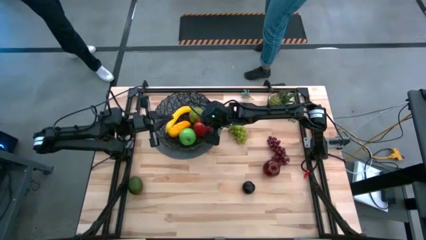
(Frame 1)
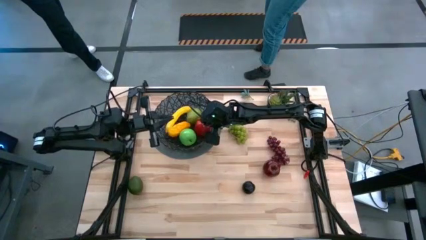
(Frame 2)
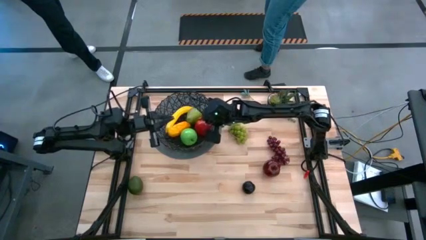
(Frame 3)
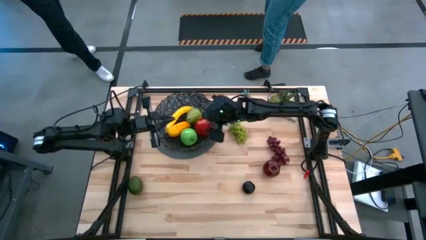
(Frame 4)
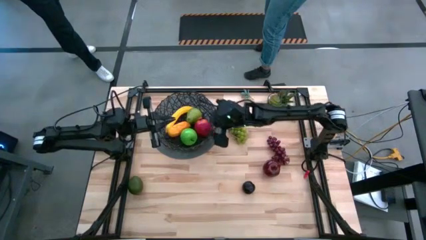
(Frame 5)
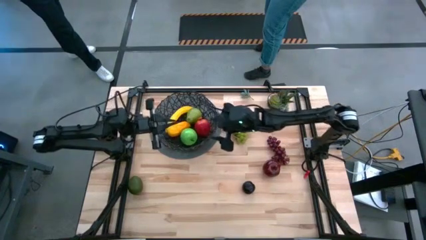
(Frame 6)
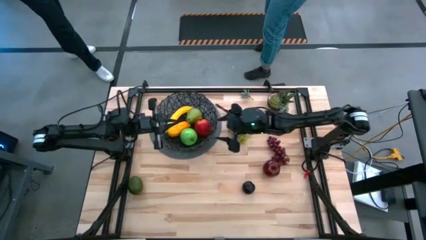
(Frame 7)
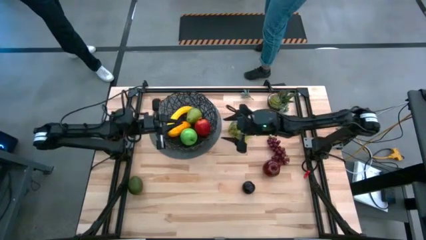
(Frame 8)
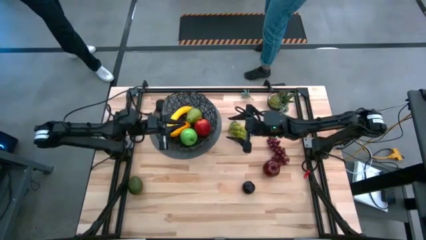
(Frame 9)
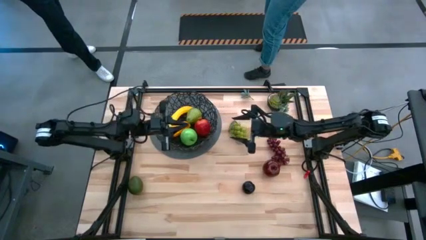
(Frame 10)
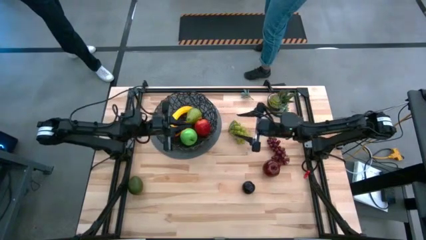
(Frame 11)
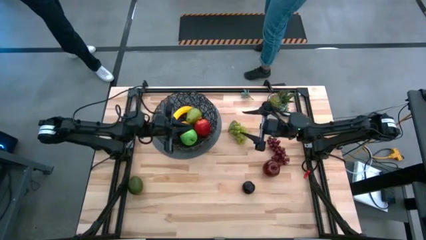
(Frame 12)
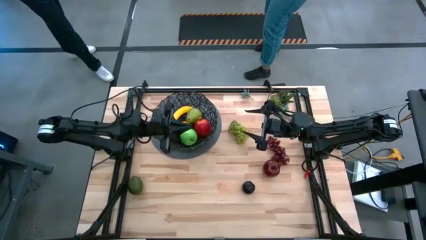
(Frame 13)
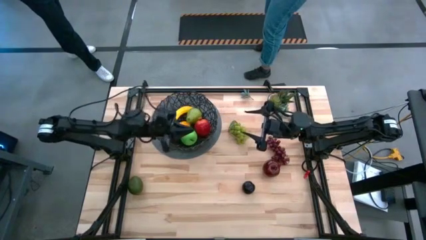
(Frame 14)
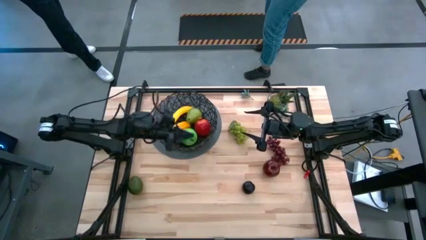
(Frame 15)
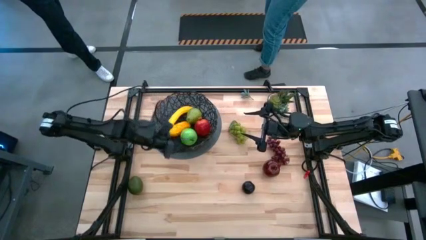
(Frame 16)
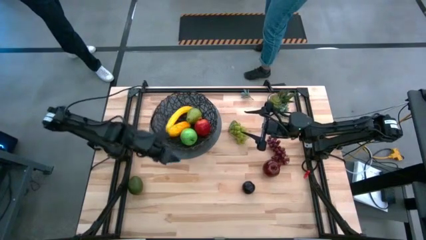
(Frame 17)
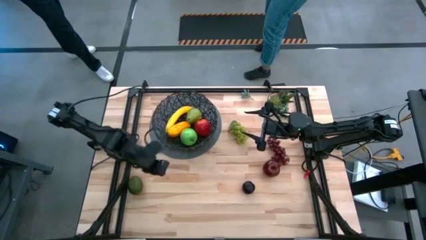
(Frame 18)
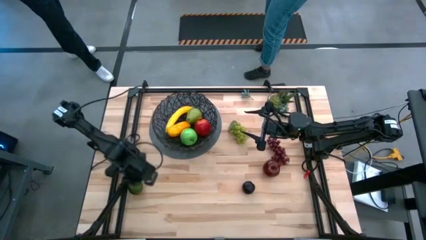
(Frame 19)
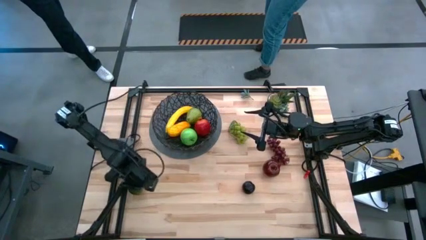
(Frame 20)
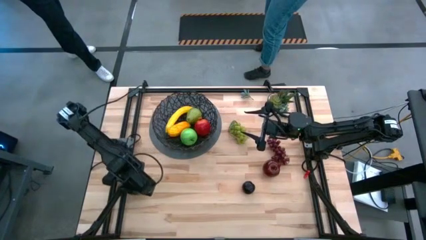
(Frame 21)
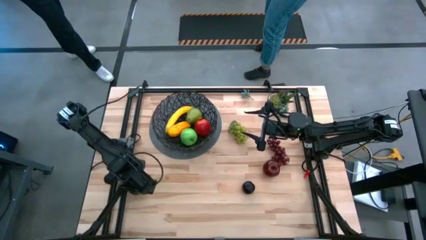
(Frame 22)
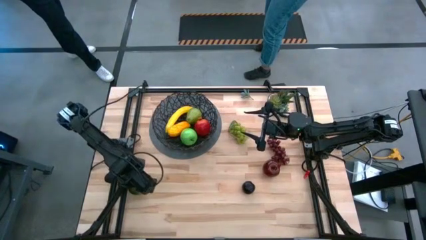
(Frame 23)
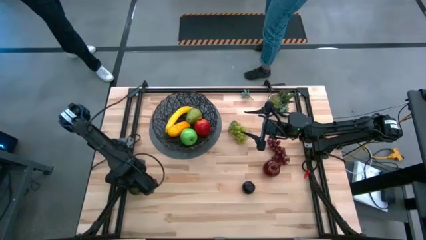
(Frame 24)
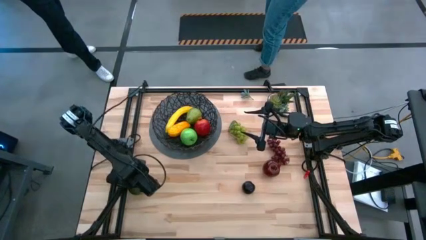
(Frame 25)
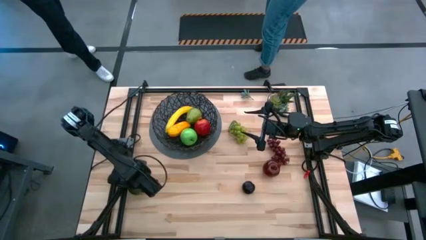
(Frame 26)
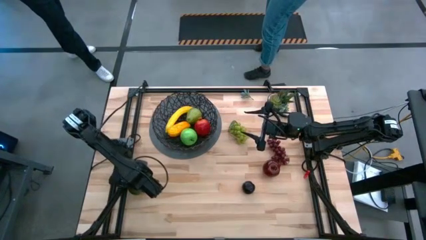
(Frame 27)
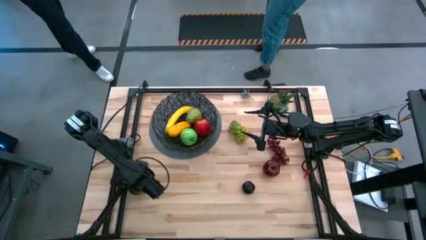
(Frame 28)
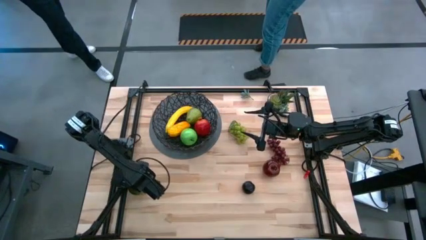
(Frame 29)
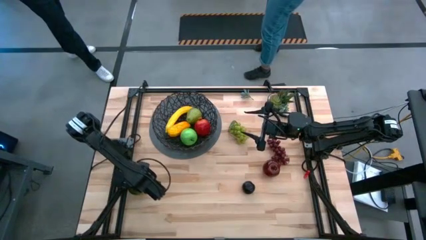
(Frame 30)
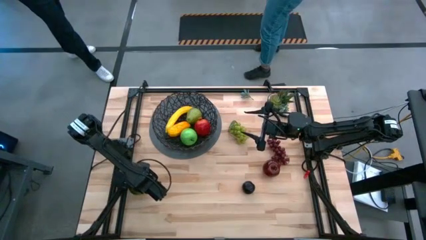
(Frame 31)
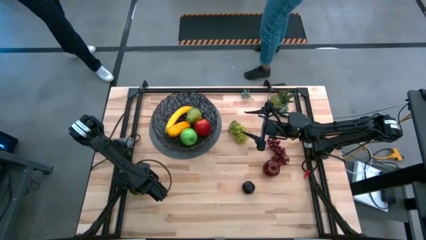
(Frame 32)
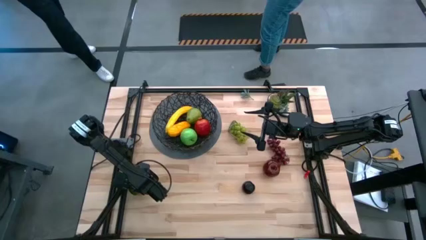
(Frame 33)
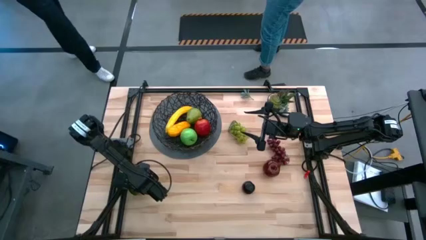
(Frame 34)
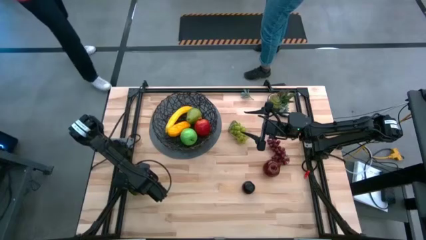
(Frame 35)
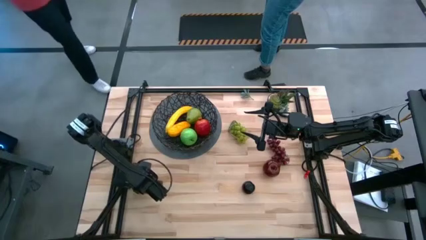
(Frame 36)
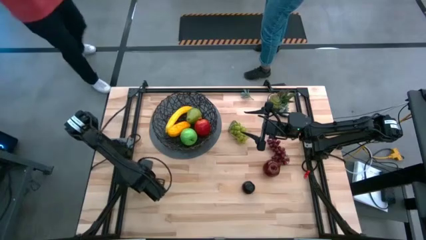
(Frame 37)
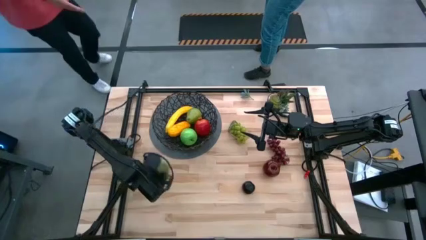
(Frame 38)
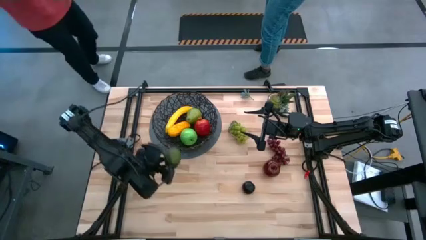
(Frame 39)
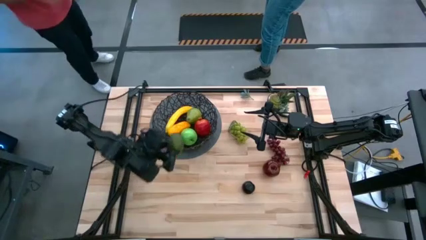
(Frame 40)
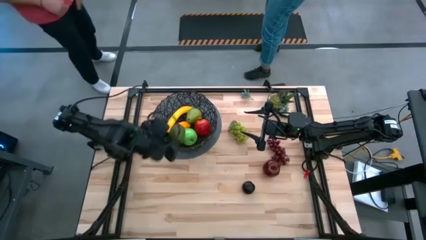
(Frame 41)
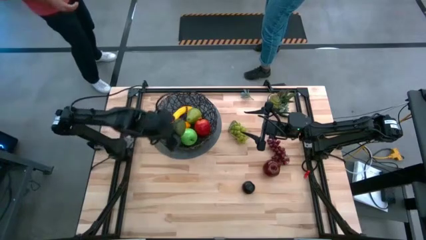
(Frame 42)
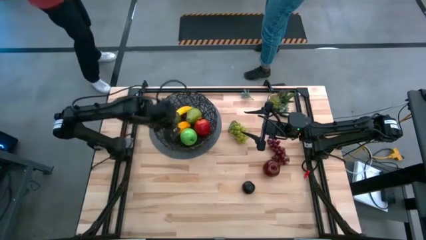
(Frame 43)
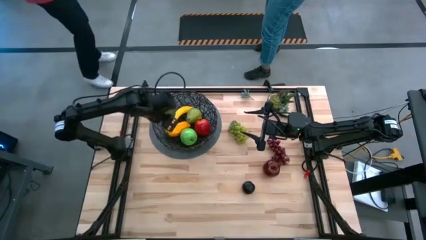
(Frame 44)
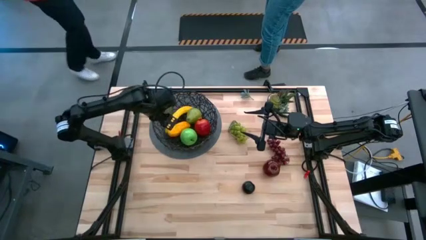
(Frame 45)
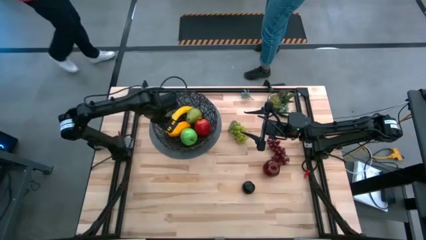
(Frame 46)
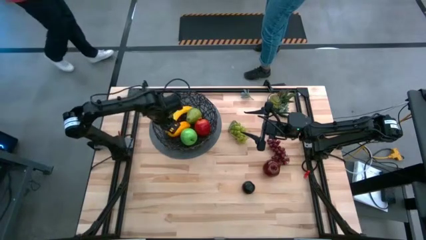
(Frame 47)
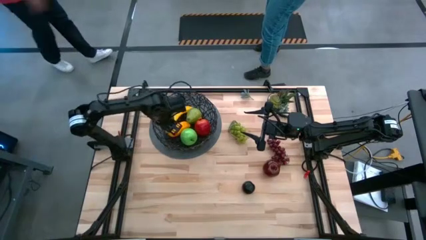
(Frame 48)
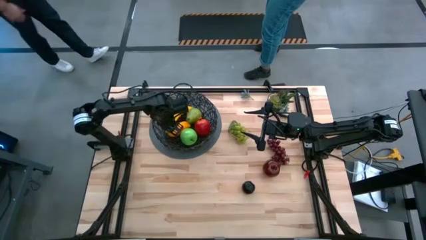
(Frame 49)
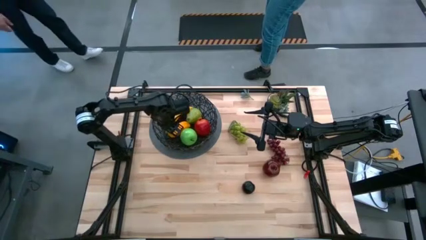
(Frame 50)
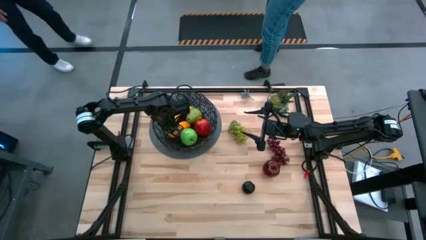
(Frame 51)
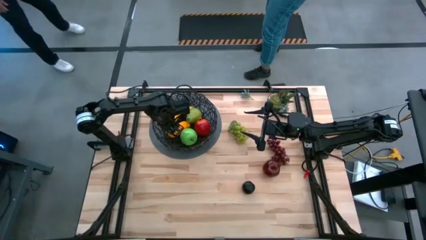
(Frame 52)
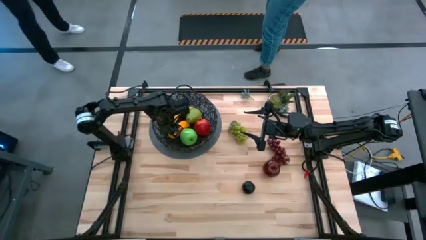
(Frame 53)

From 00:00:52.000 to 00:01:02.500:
Task: Build produce basket
Put the green lime into the basket

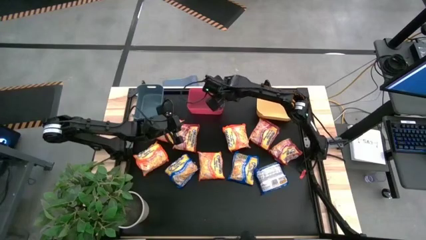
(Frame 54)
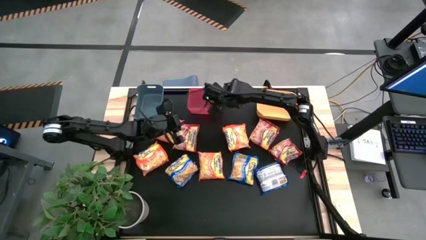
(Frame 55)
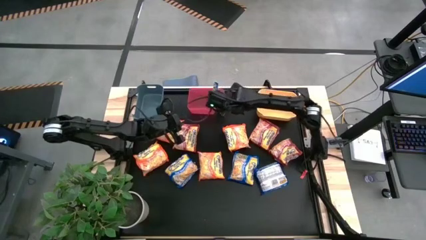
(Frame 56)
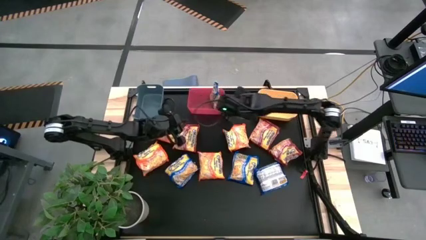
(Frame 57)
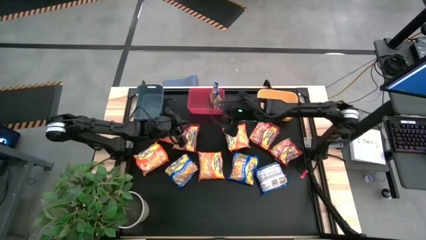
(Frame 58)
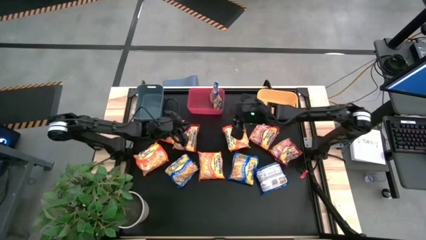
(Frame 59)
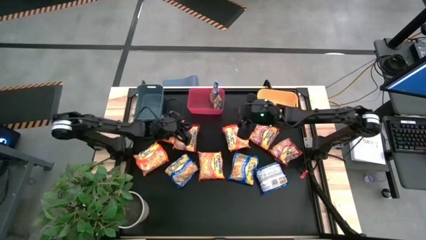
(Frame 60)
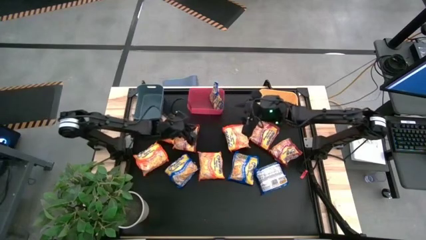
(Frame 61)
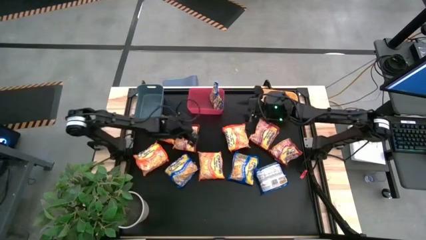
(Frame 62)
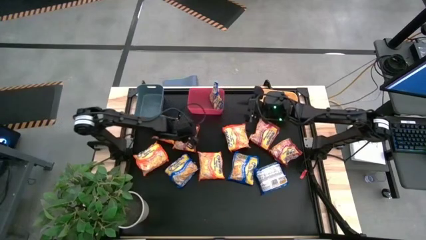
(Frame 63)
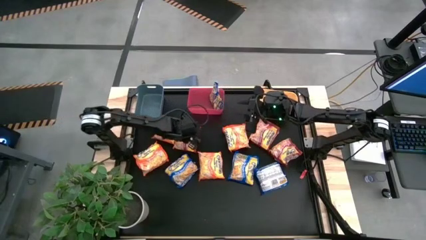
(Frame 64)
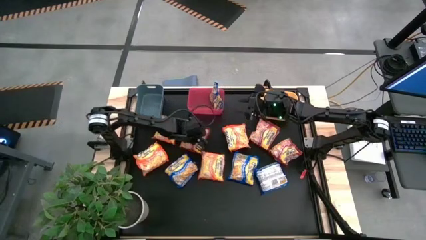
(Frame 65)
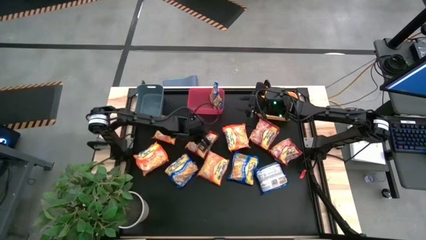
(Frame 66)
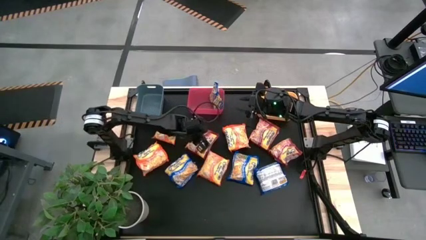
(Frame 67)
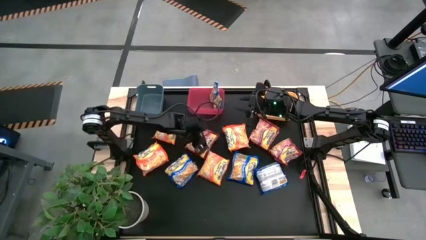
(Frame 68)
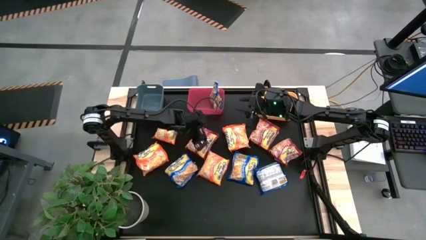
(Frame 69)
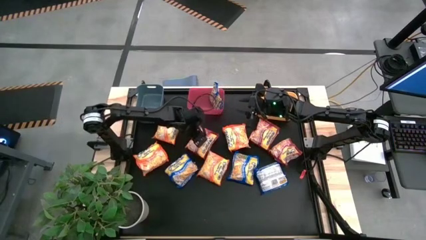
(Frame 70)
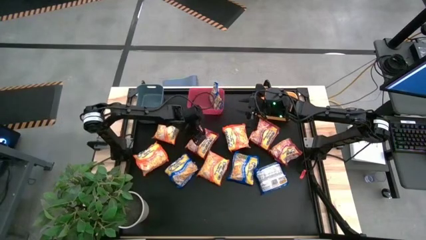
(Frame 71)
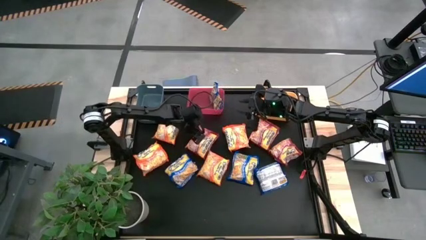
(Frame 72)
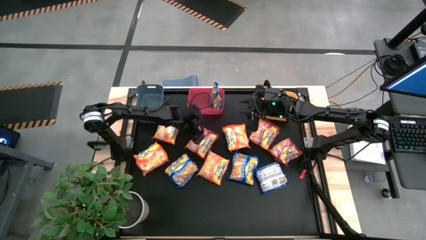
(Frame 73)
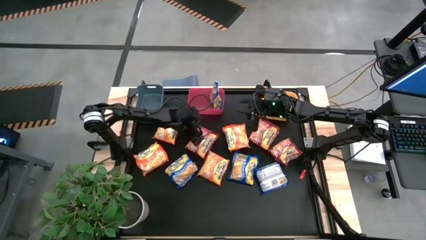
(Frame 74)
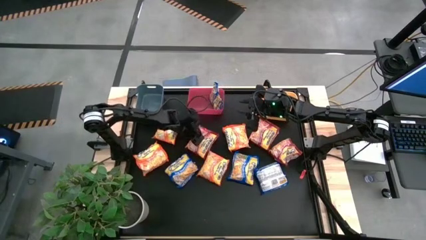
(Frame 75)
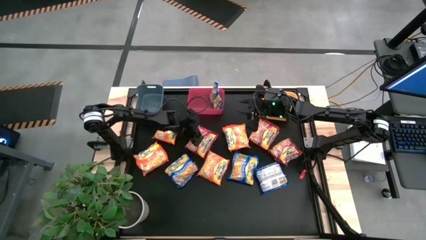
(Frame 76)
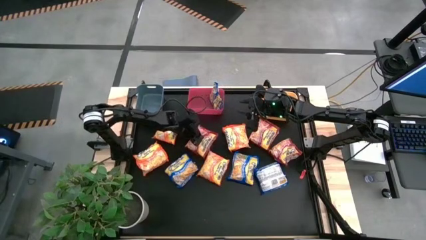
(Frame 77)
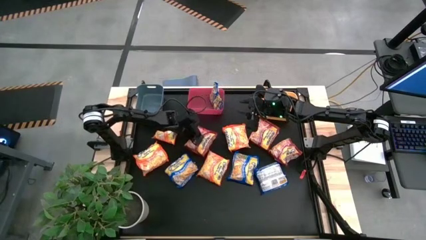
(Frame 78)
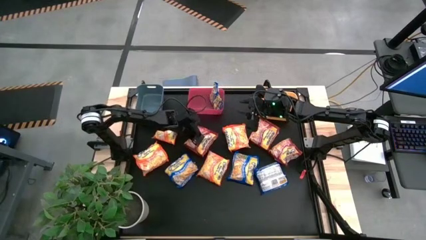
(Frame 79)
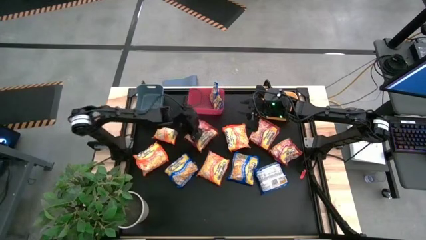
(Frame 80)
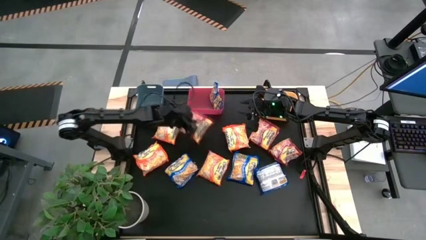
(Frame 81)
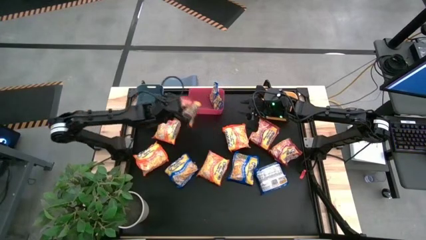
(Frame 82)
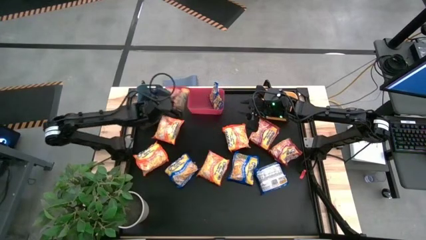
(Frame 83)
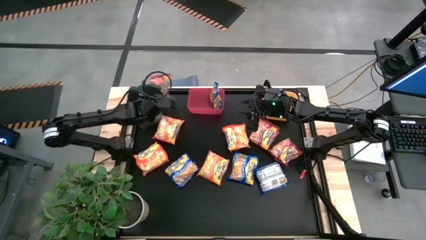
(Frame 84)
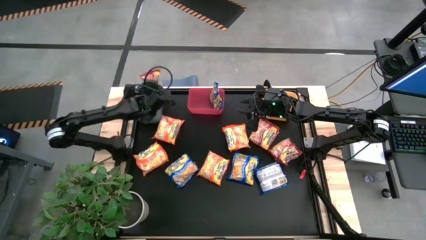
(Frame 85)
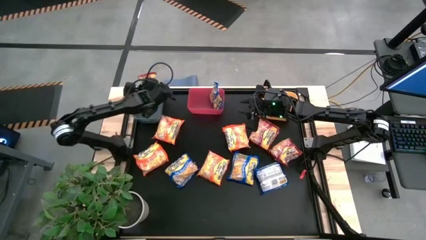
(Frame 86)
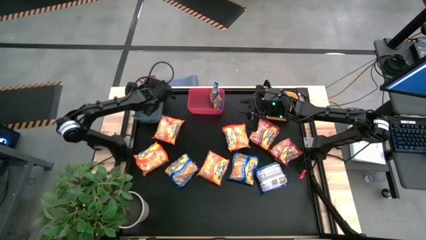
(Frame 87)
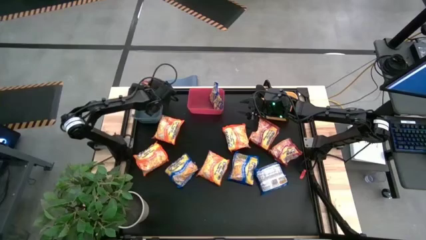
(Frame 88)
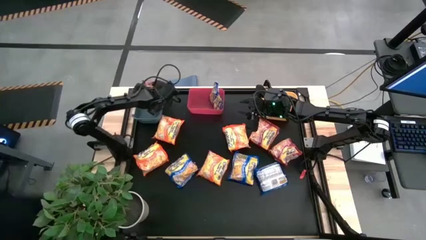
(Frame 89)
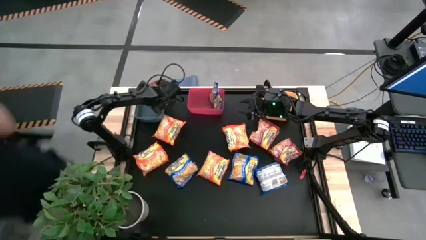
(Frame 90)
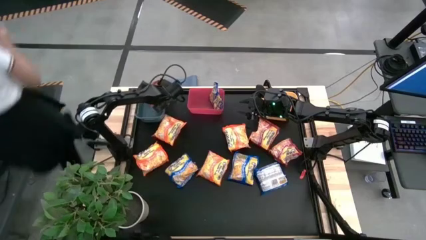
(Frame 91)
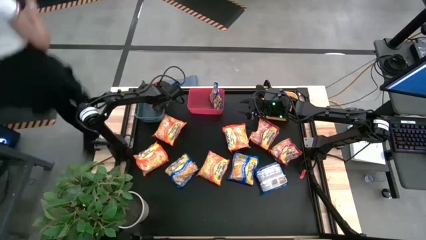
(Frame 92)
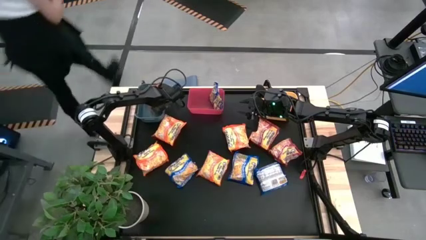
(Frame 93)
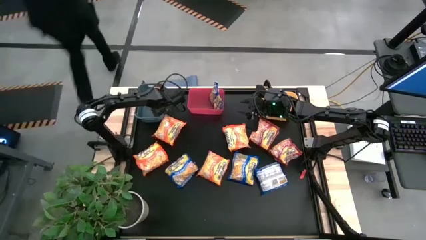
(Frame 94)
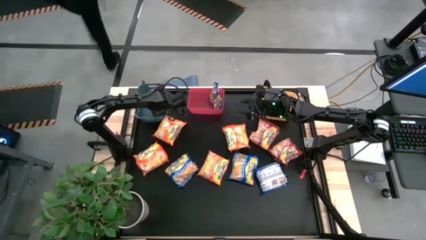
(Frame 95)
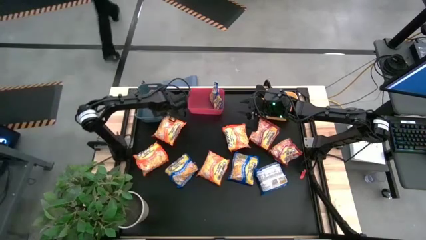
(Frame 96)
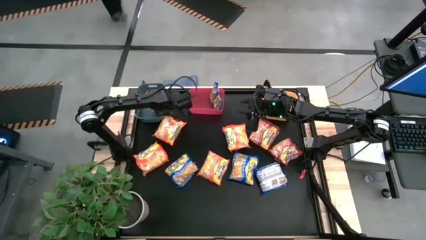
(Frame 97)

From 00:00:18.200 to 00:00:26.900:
Task: Sort Maruchan noodles
Put the red noodle pack into the gray bin
